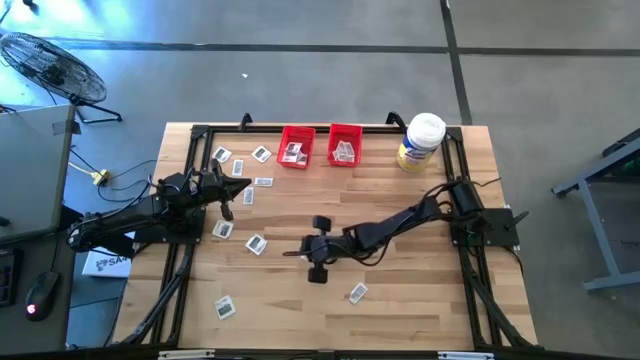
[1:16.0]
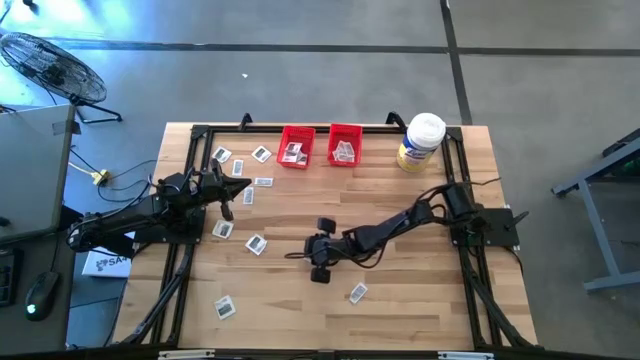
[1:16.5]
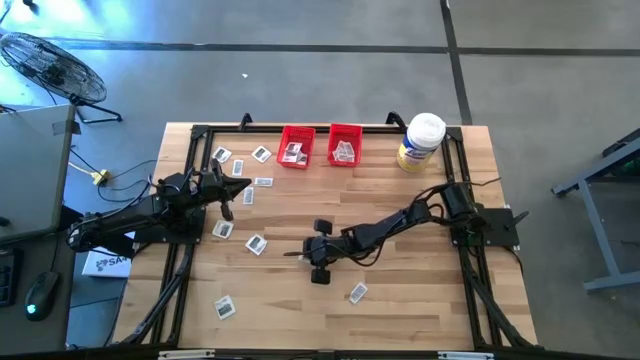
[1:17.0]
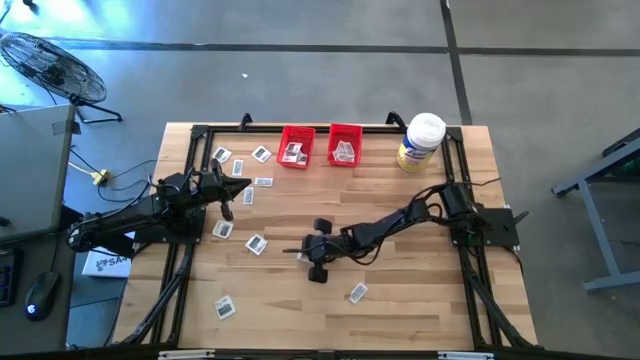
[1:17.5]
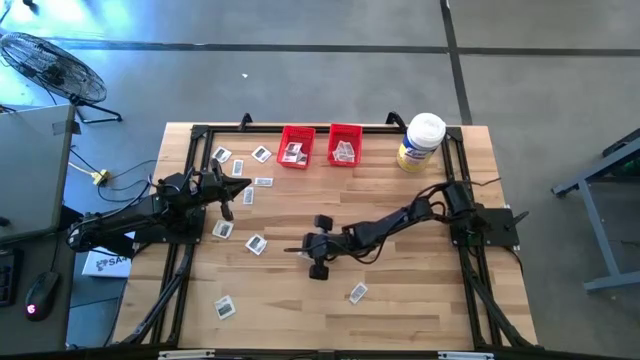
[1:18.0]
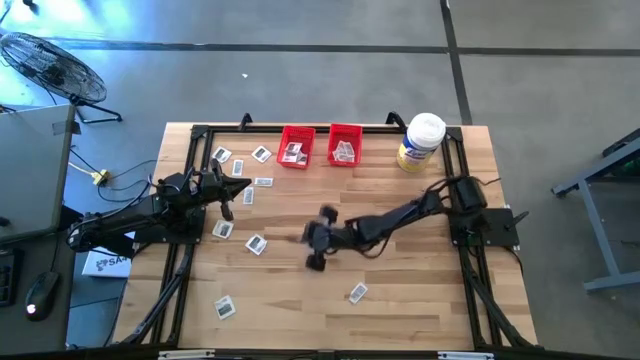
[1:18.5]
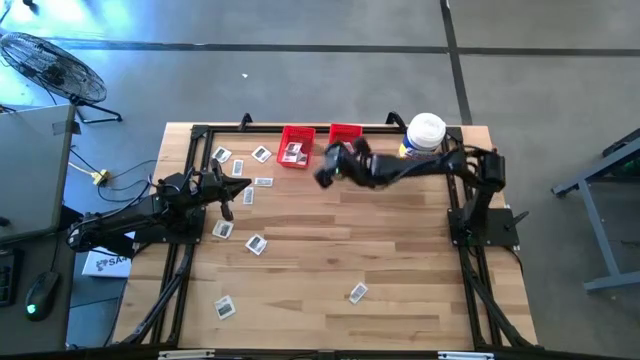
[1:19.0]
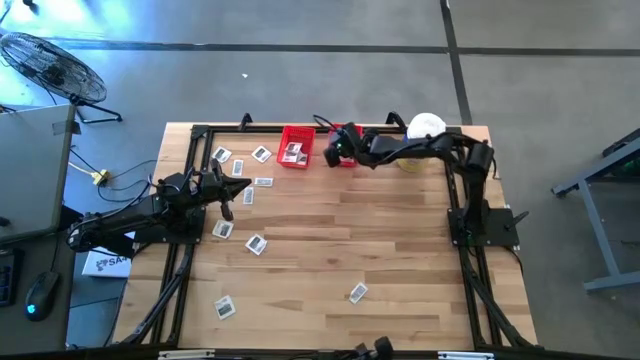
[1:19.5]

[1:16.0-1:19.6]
Task: Pick & Place First Aid Supplies
Put the ointment pack into the right red bin

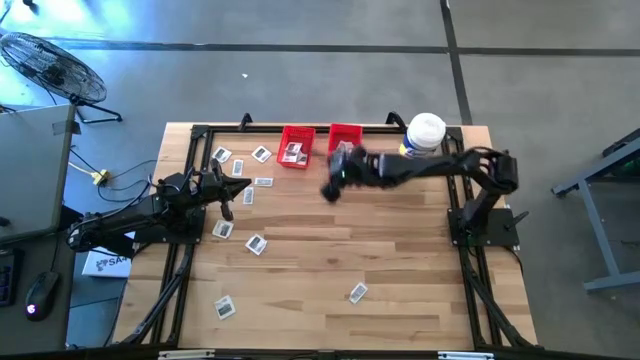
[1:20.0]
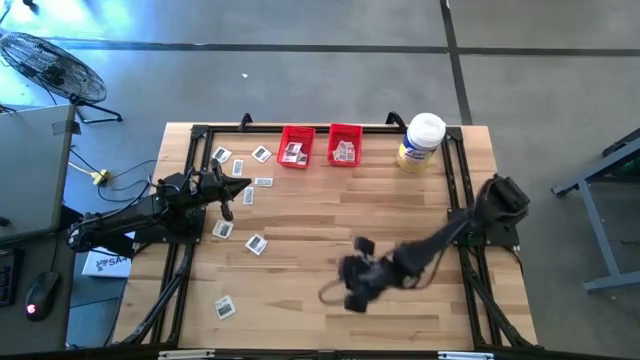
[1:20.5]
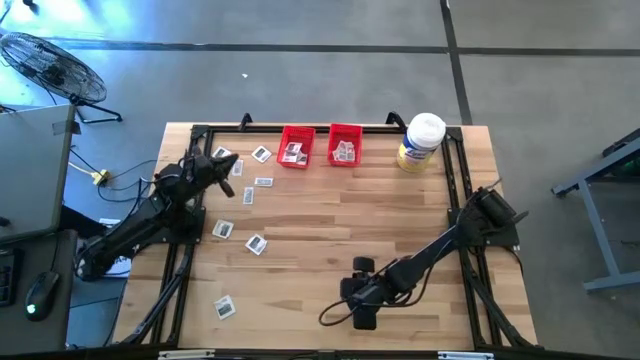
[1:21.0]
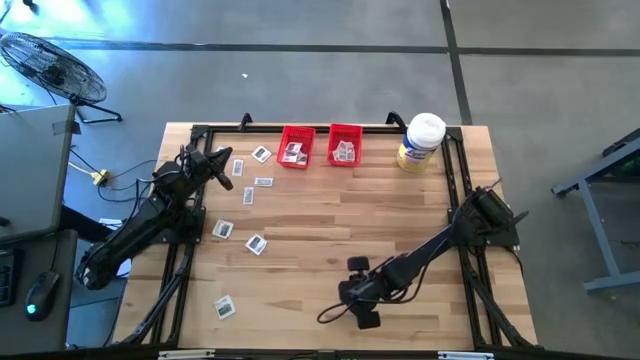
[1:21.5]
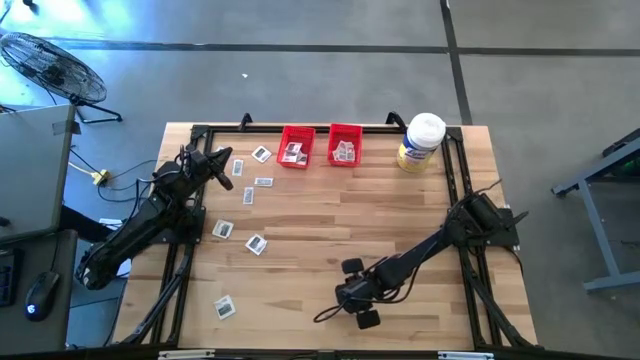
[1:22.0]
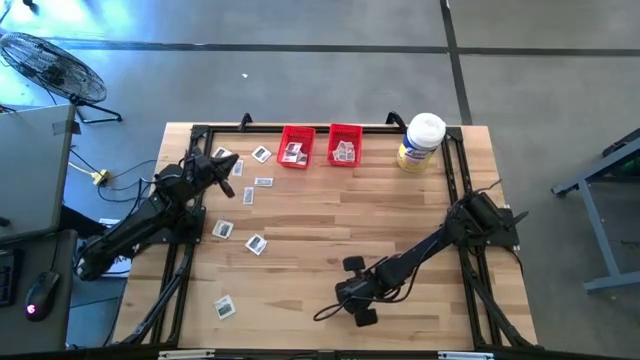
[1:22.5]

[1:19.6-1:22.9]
Put the ointment pack into the right red bin

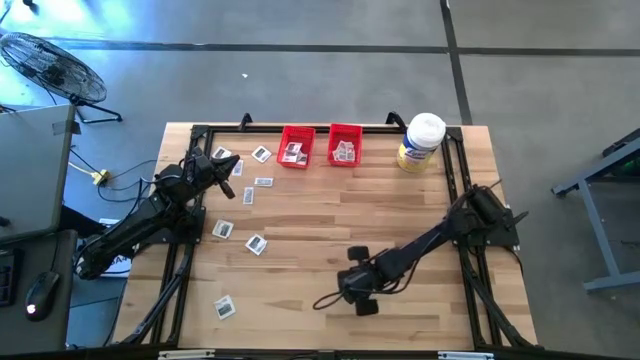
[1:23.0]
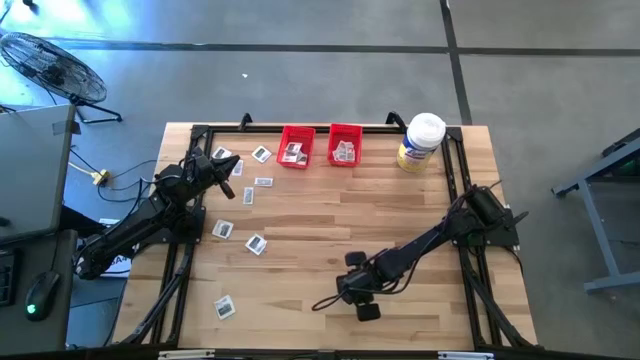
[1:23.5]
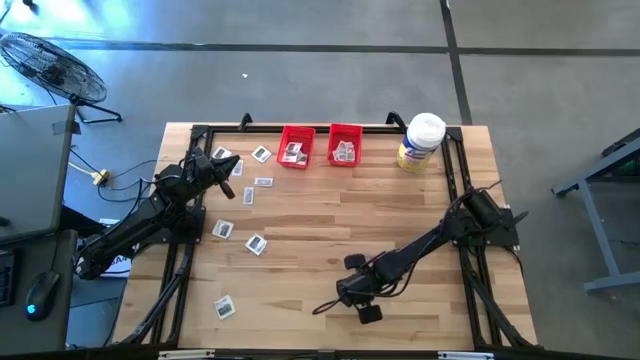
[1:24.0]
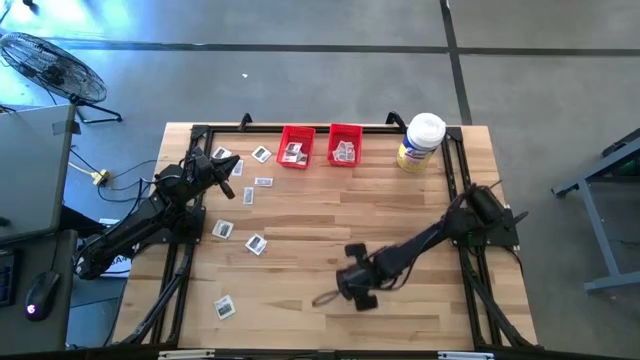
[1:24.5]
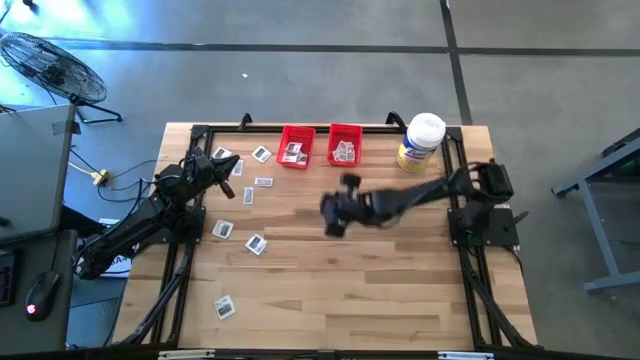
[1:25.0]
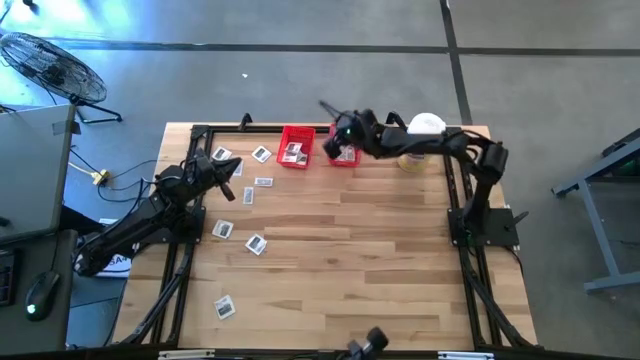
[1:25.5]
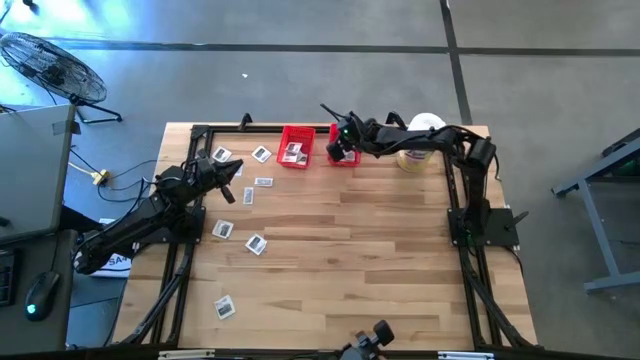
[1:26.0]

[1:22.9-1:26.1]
Put the ointment pack into the right red bin

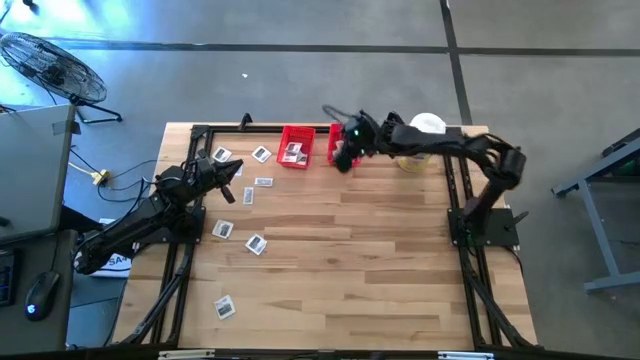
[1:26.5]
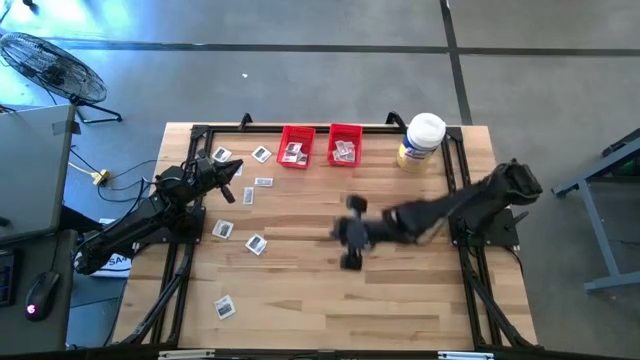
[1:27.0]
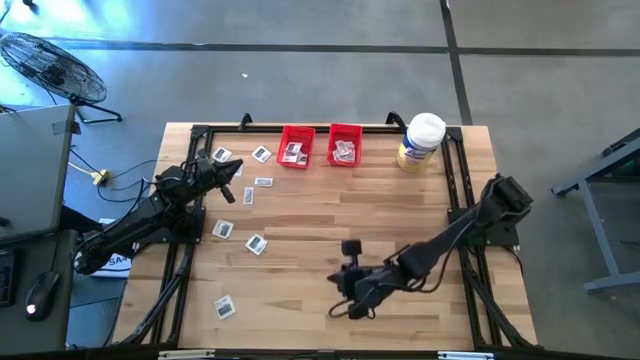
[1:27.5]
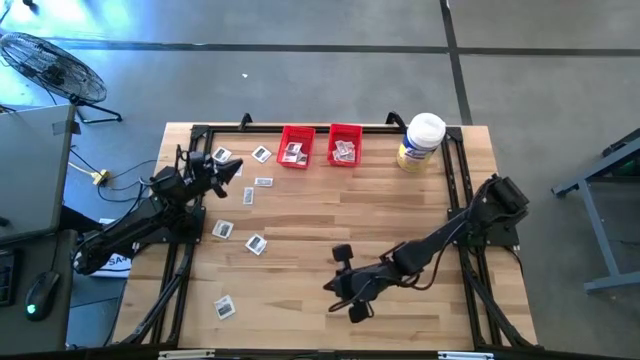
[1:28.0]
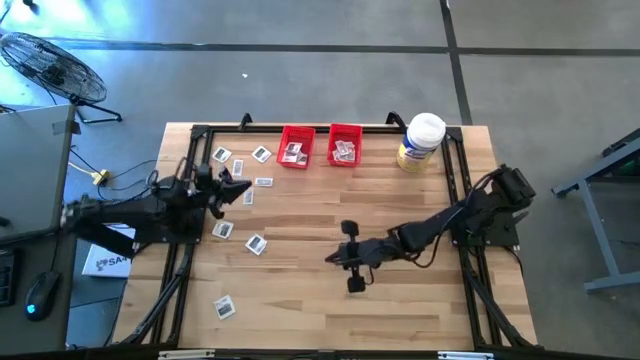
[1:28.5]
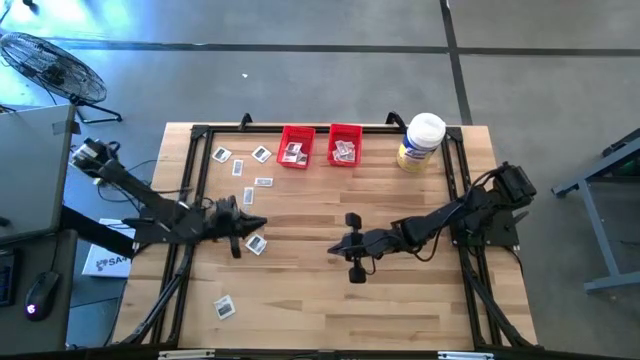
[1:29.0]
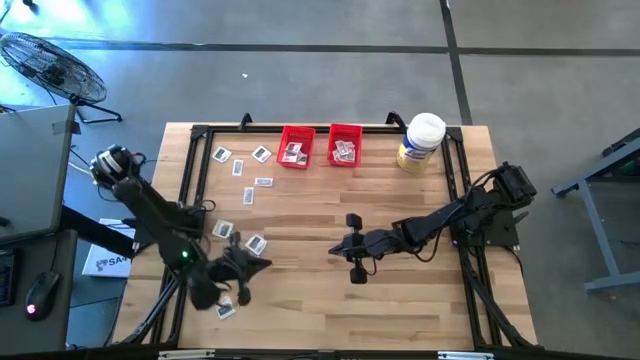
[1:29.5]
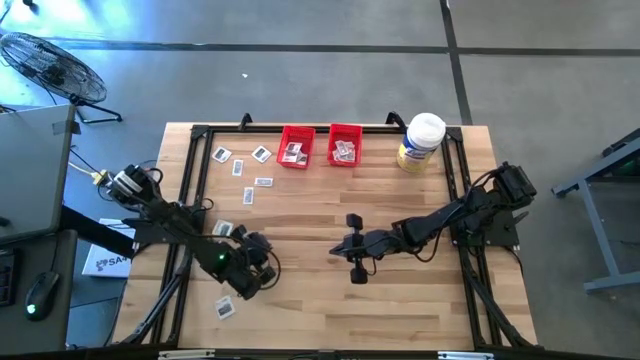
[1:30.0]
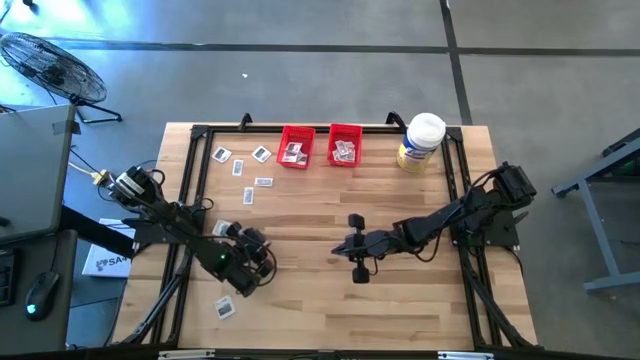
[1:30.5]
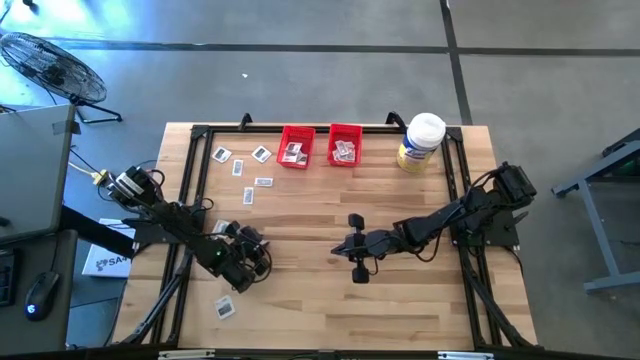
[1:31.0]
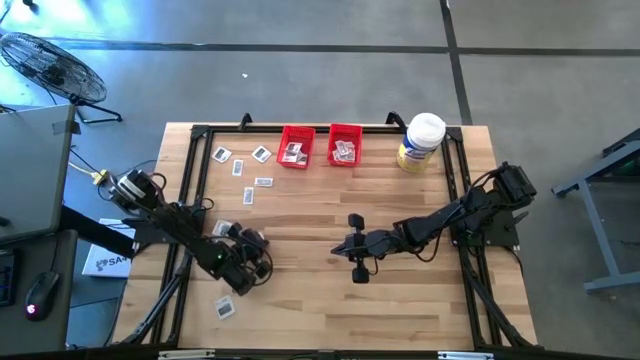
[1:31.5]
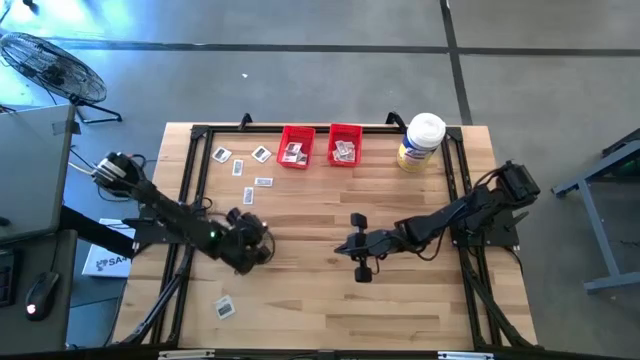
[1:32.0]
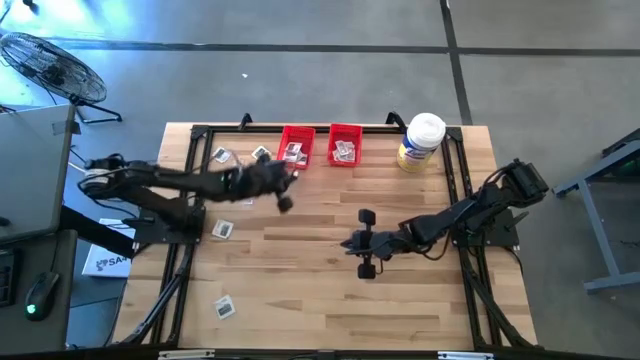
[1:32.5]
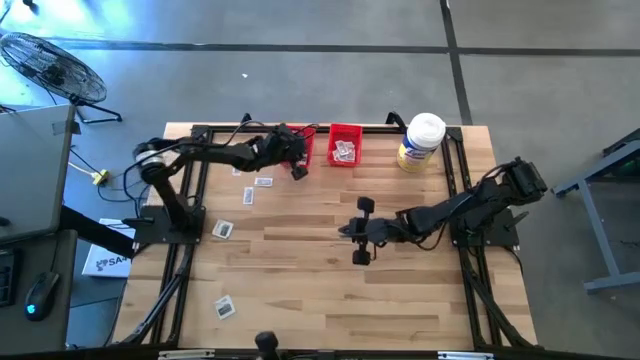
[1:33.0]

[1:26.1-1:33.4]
Put the towelette pack into the left red bin

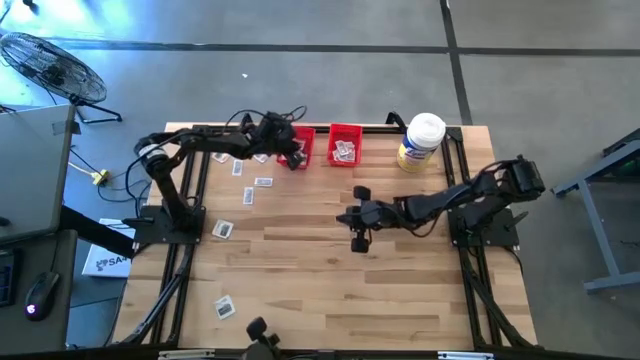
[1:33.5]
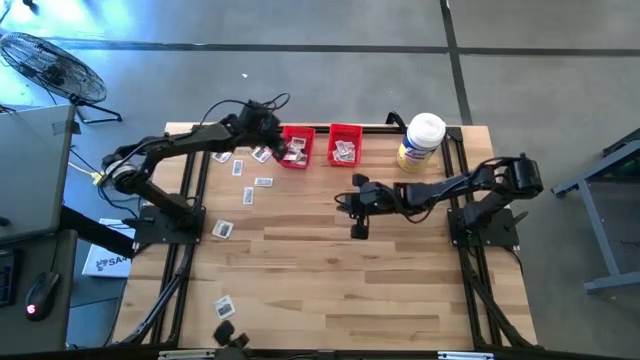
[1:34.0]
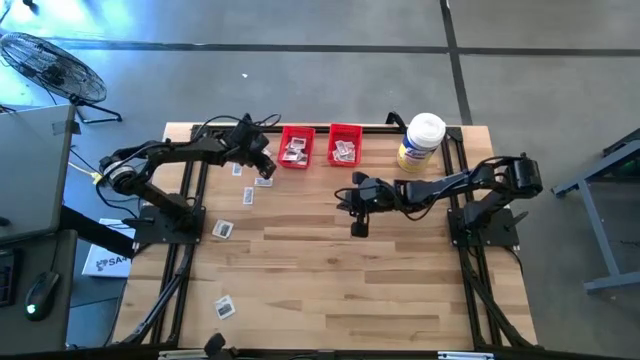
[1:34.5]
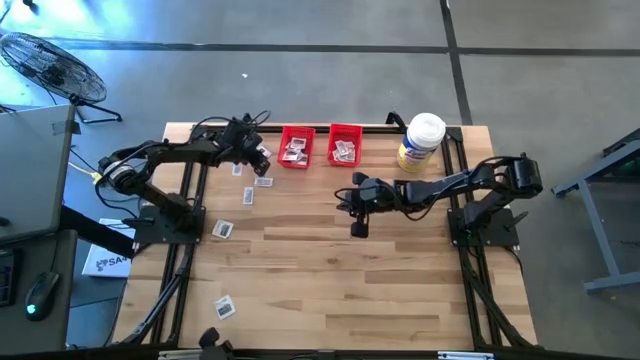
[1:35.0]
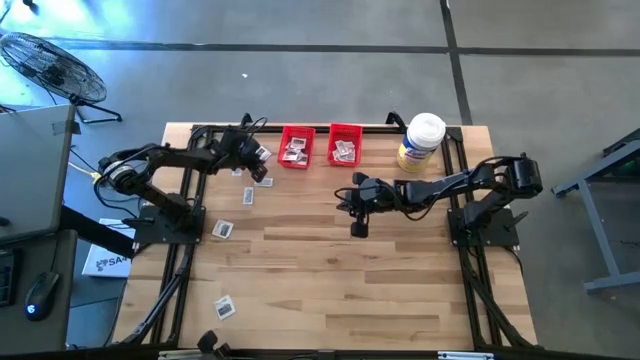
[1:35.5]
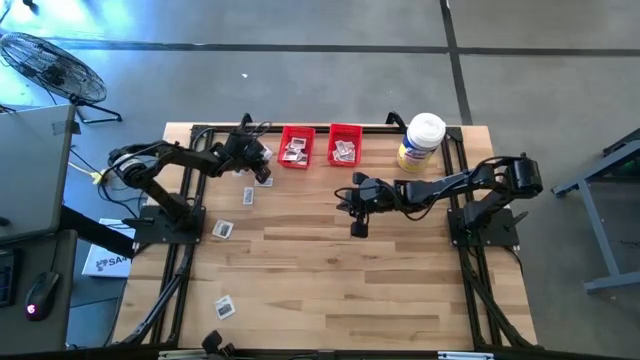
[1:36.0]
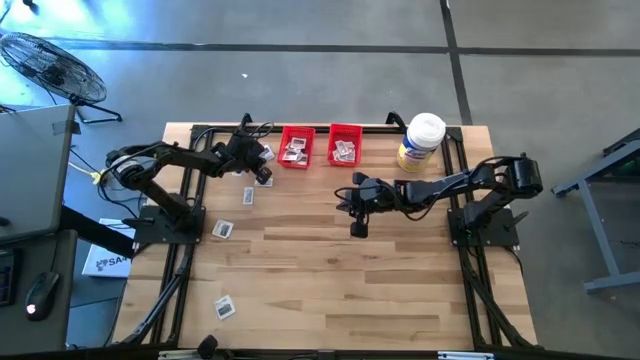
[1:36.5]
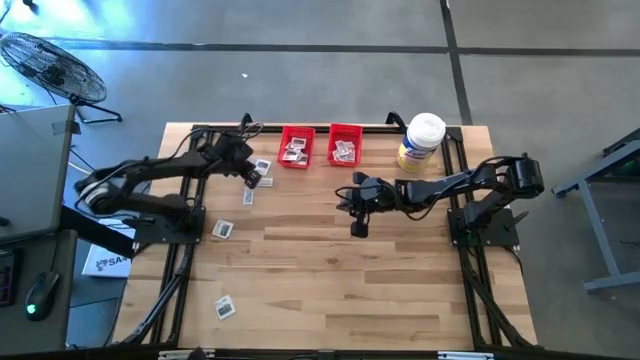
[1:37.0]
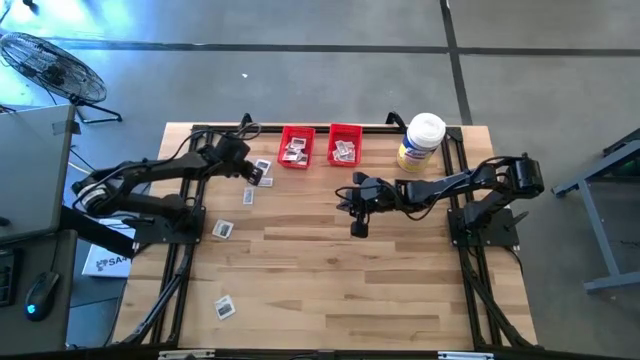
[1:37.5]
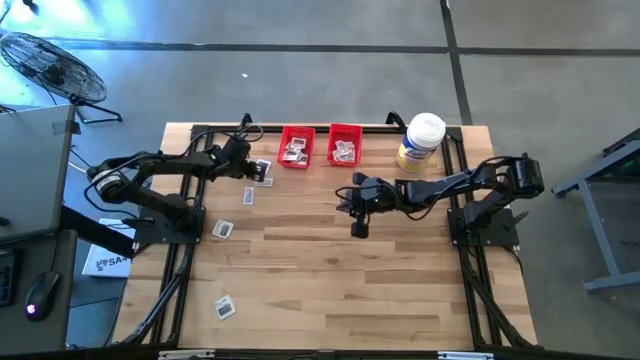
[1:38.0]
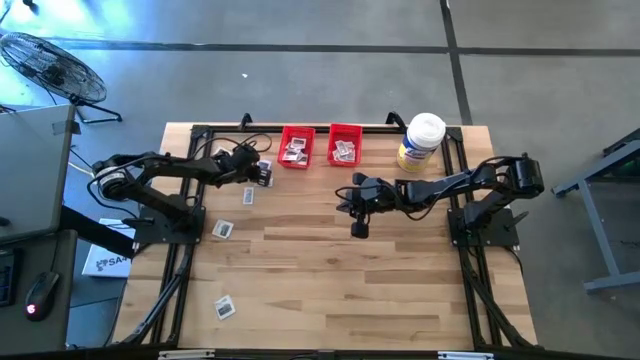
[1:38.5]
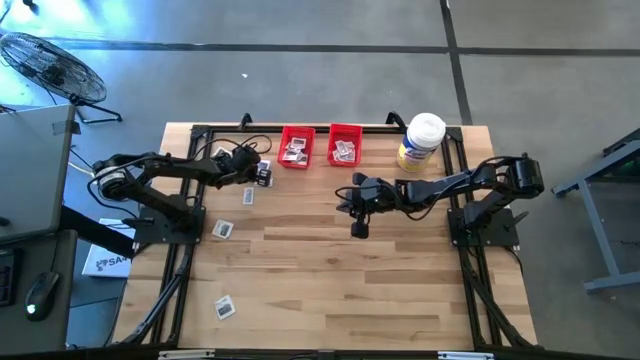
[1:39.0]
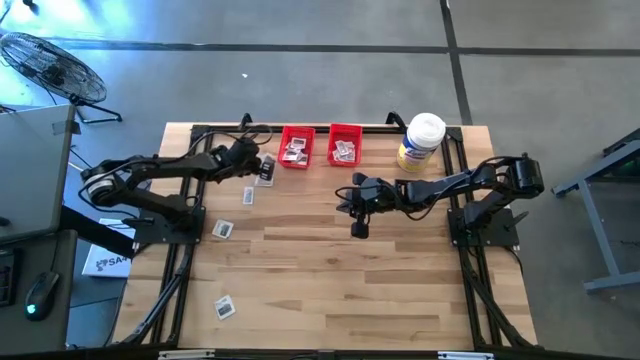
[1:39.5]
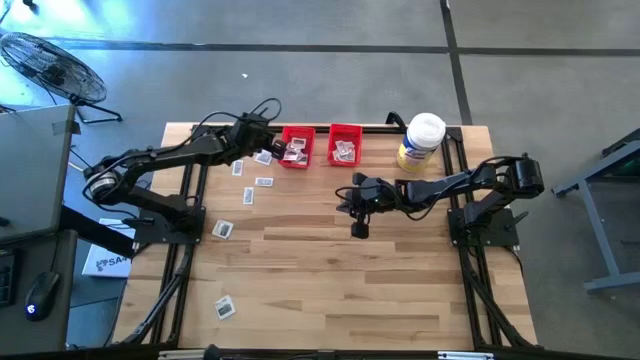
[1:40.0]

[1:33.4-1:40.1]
Put the towelette pack into the left red bin
